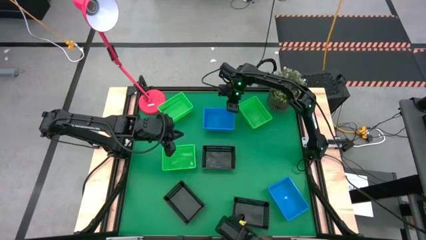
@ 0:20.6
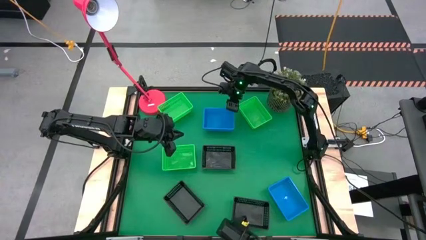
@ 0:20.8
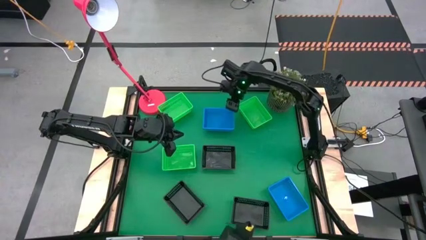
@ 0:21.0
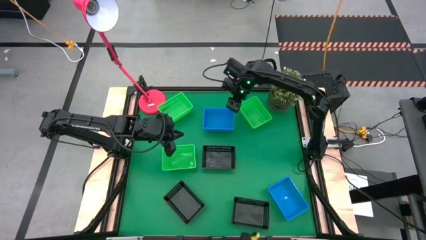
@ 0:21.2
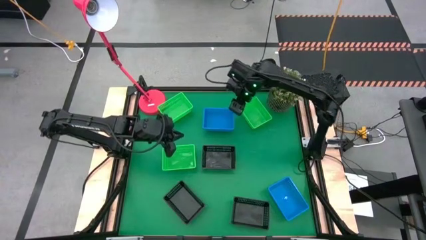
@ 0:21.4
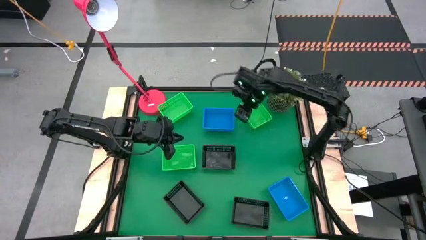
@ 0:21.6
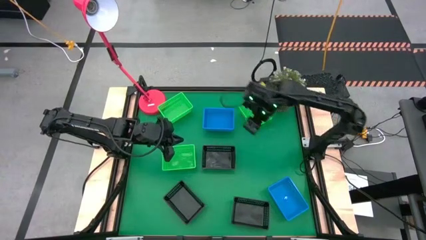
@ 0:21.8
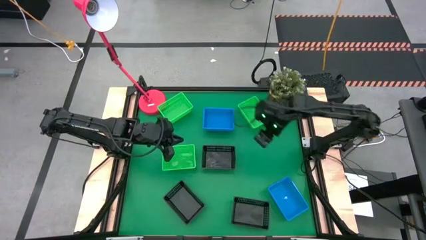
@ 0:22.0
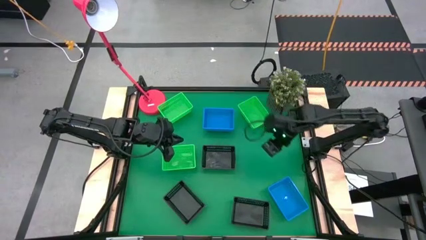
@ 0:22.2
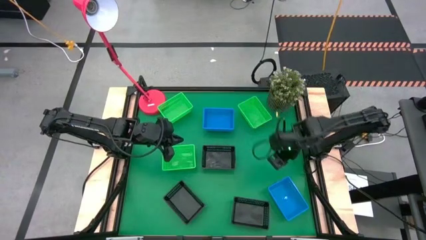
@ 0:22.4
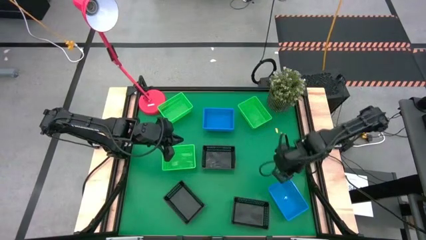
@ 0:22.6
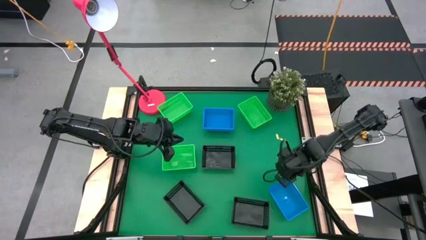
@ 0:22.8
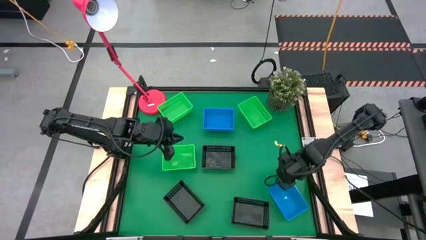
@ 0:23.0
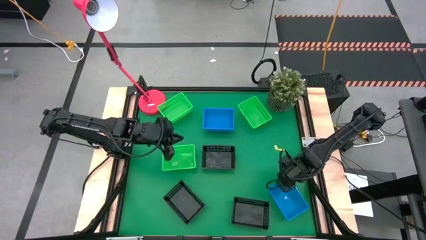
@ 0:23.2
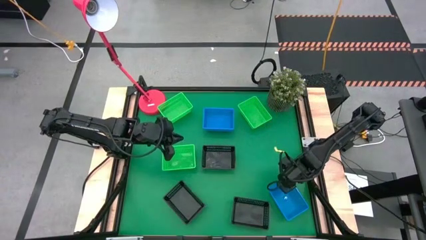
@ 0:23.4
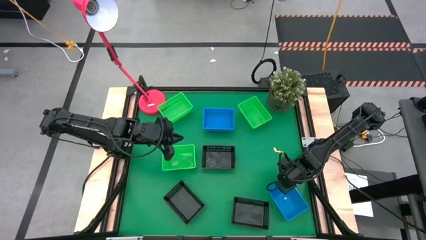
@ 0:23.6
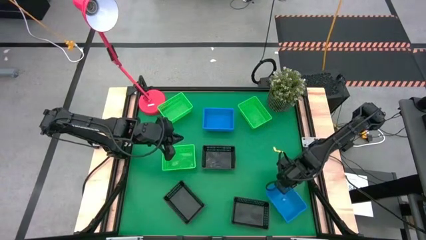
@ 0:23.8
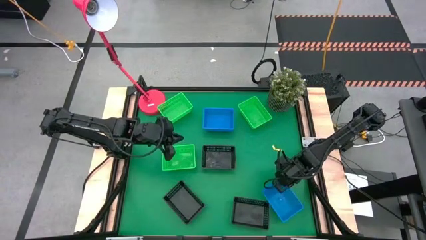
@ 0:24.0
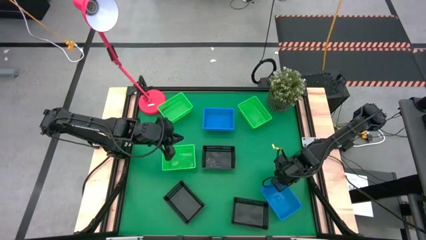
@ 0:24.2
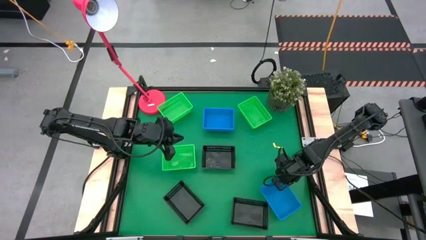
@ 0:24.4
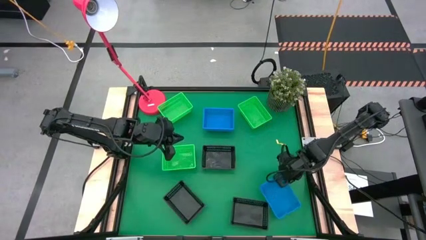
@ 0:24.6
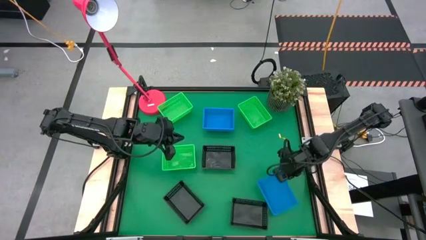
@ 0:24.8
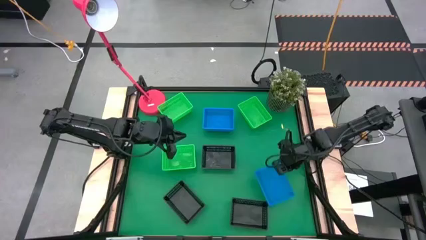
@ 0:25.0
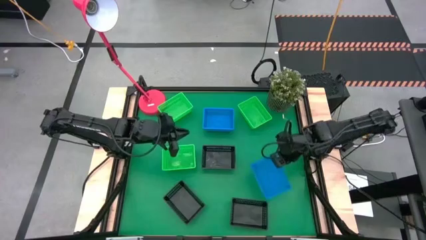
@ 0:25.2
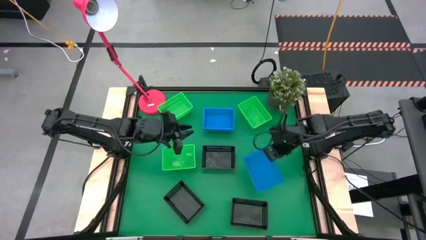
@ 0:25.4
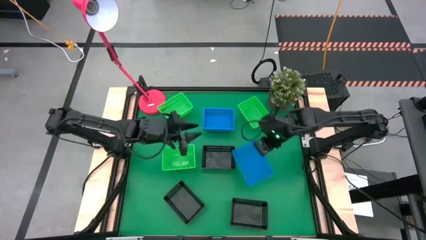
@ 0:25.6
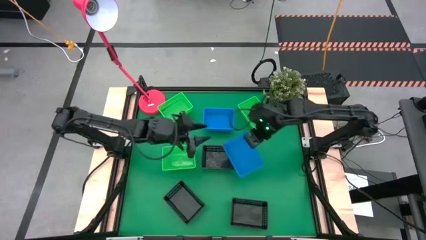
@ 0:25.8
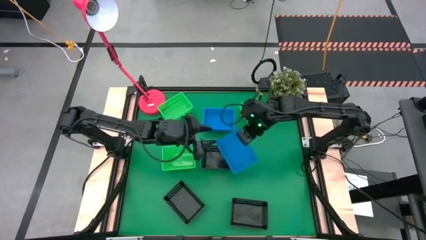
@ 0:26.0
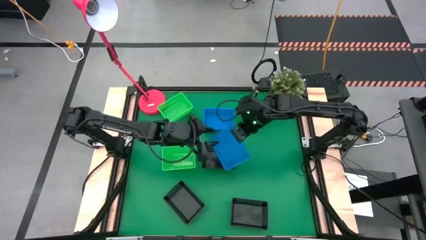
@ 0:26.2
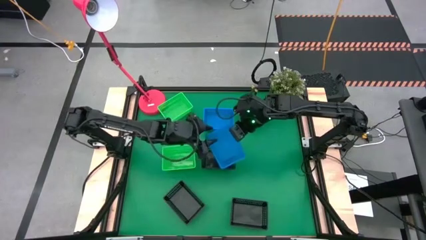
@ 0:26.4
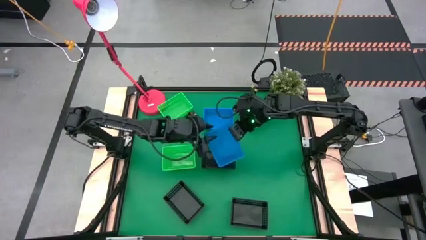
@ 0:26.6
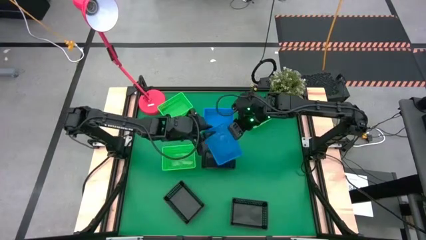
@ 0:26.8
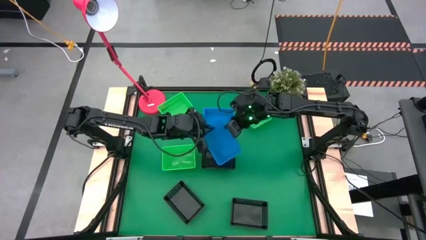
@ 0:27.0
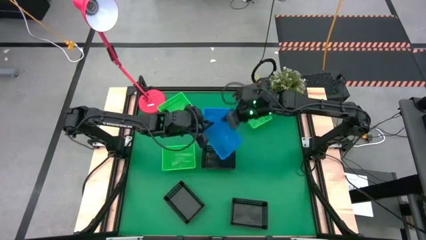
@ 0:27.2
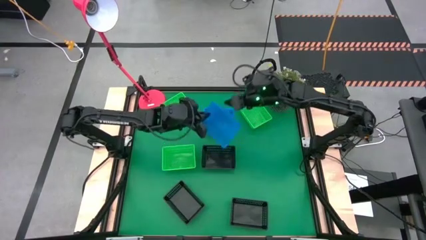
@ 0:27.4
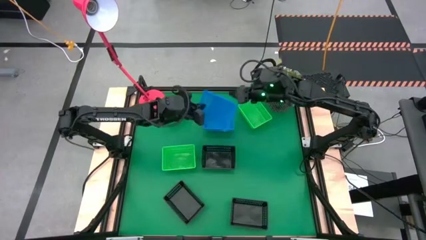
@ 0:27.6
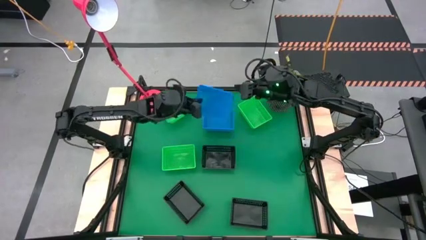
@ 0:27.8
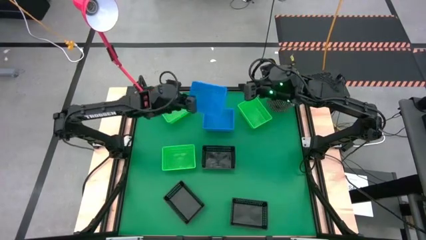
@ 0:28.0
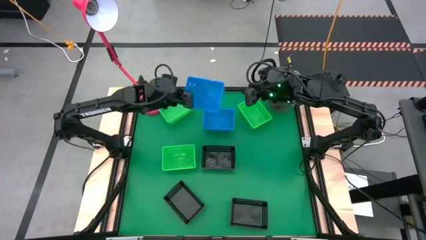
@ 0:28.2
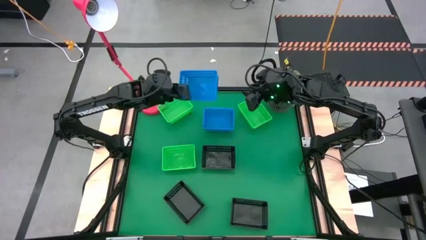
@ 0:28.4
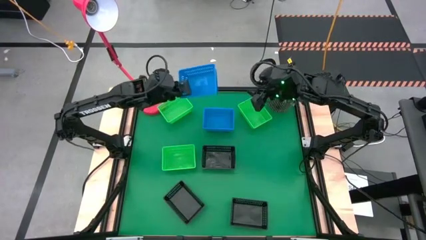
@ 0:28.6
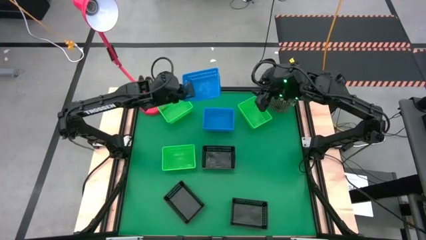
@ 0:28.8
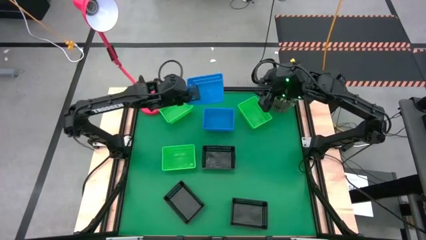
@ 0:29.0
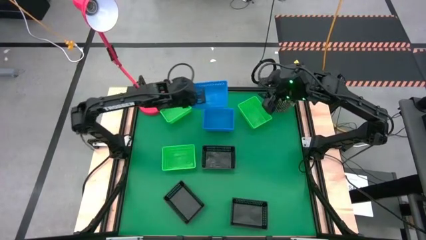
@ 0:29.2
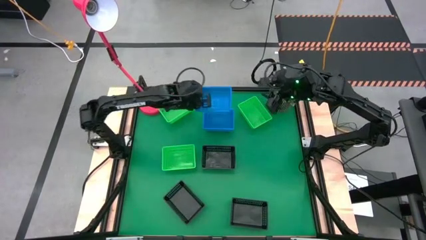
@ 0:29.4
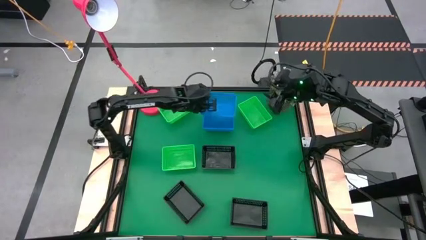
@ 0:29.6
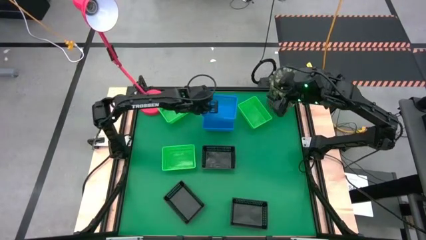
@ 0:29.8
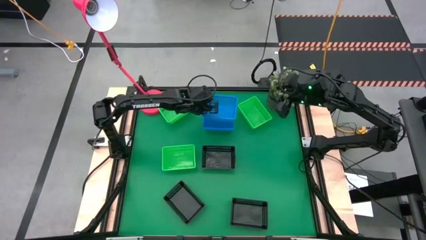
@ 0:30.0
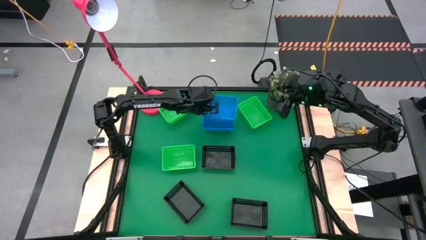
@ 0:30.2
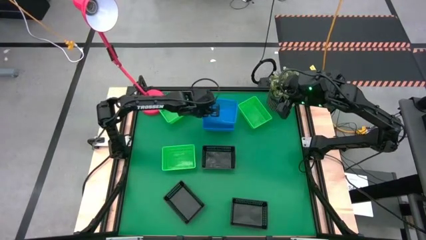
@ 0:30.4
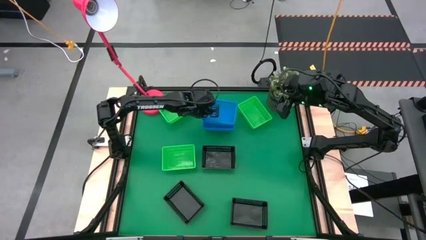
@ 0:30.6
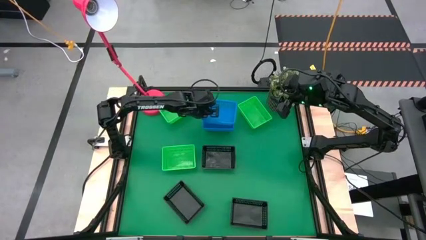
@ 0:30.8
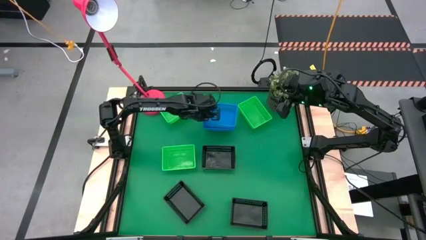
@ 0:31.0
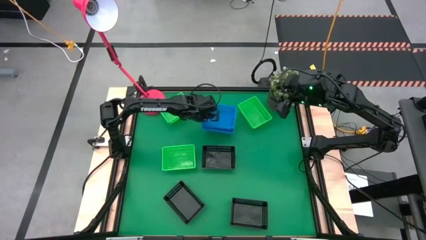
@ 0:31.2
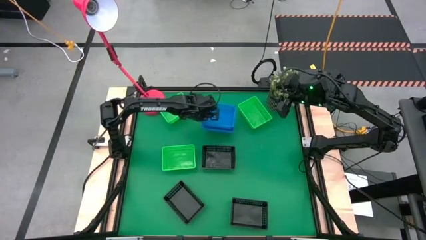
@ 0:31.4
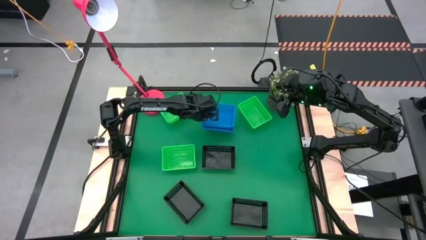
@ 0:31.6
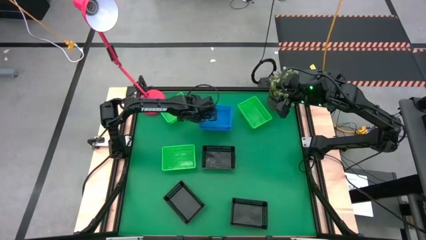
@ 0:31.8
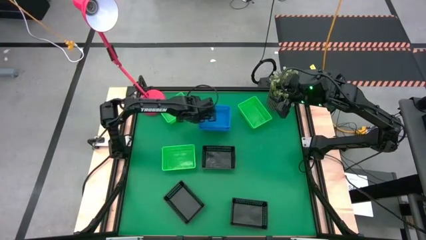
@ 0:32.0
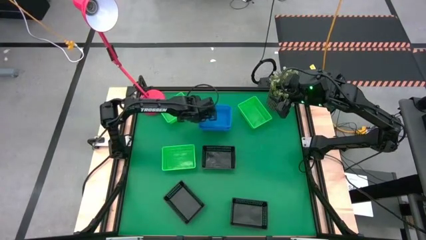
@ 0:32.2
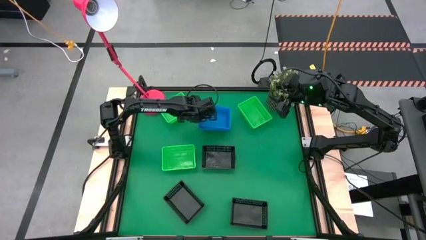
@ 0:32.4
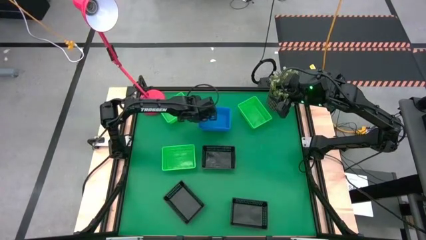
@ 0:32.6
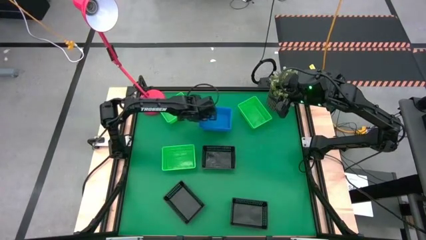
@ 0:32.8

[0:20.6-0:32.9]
Stack the bottom blue bin on the top of the top stacked blue bins
